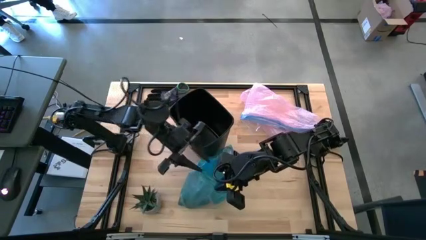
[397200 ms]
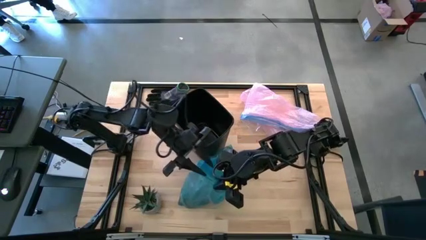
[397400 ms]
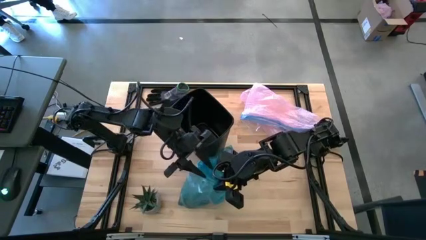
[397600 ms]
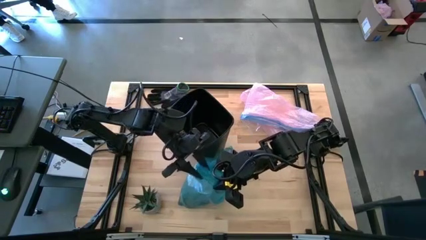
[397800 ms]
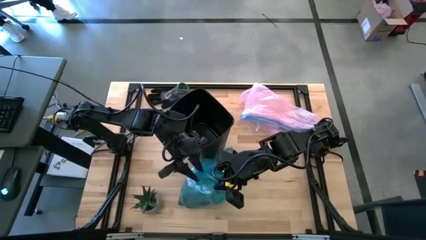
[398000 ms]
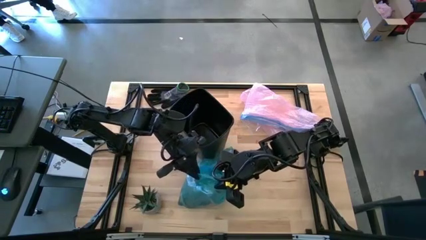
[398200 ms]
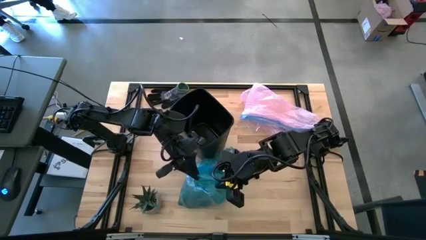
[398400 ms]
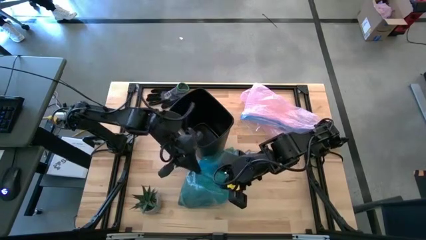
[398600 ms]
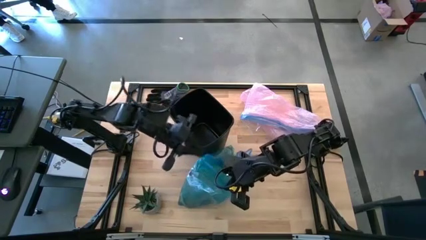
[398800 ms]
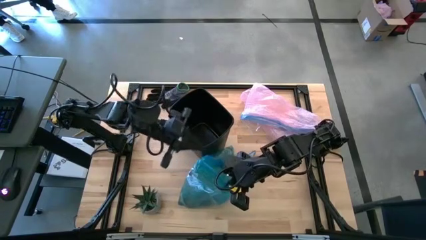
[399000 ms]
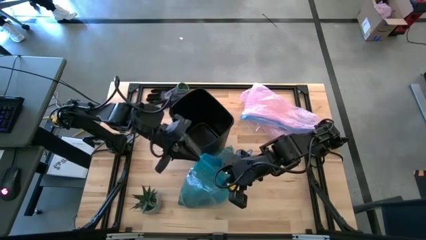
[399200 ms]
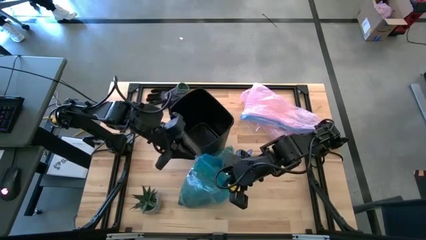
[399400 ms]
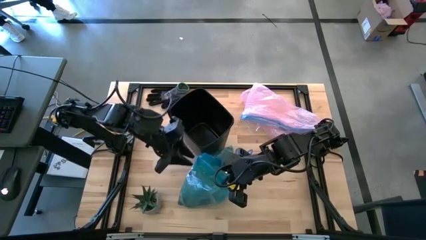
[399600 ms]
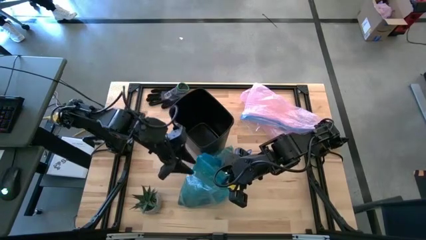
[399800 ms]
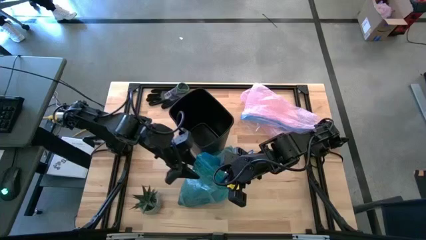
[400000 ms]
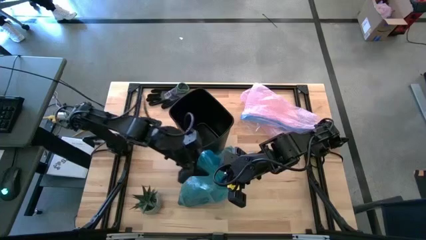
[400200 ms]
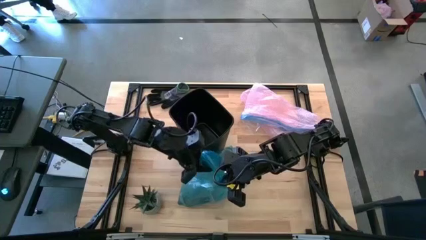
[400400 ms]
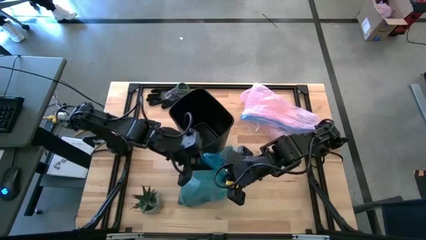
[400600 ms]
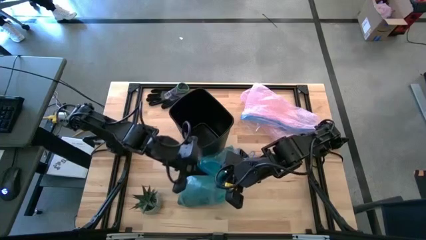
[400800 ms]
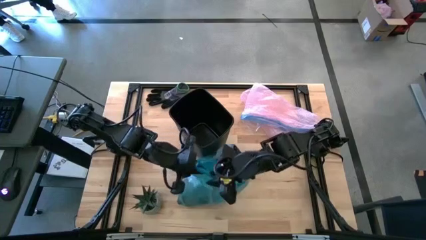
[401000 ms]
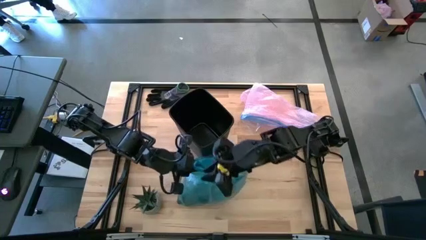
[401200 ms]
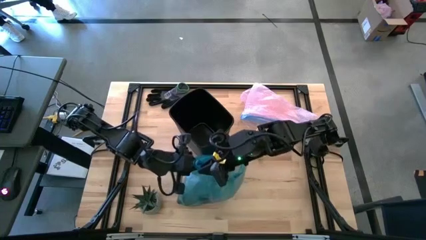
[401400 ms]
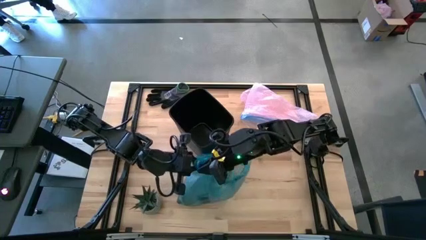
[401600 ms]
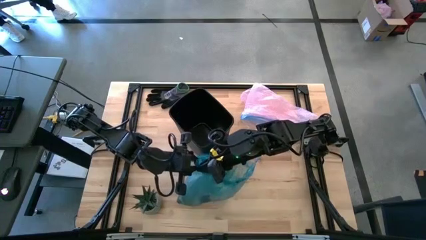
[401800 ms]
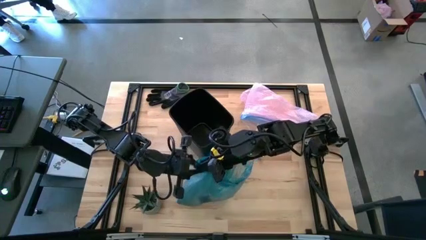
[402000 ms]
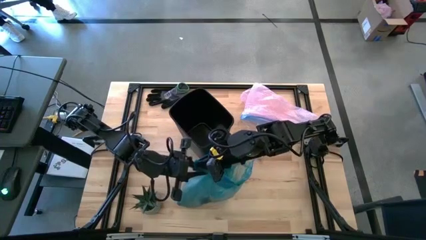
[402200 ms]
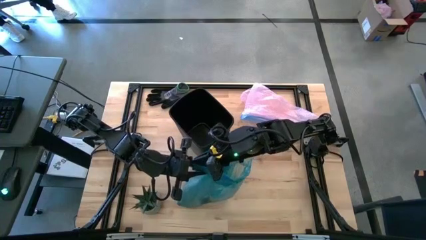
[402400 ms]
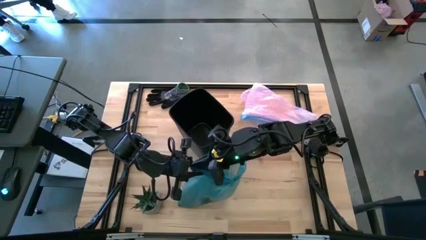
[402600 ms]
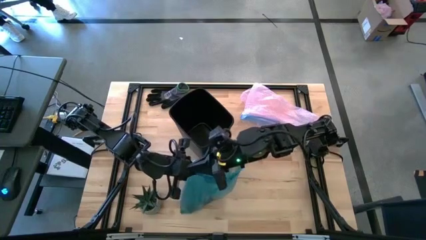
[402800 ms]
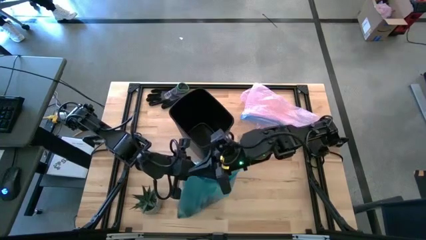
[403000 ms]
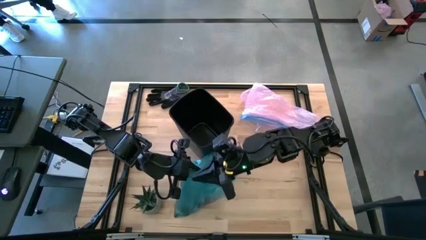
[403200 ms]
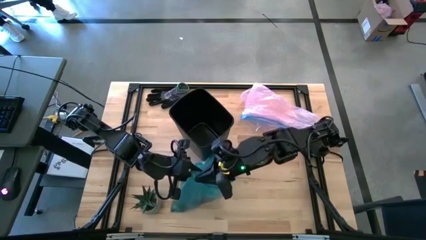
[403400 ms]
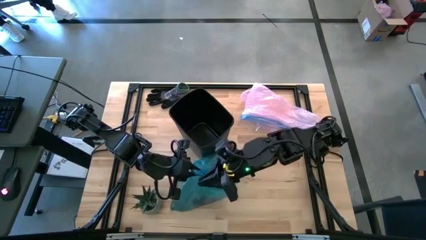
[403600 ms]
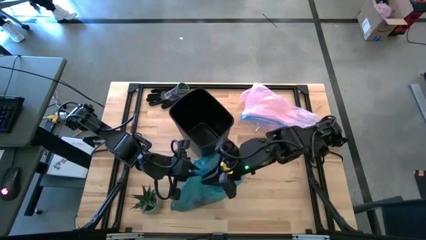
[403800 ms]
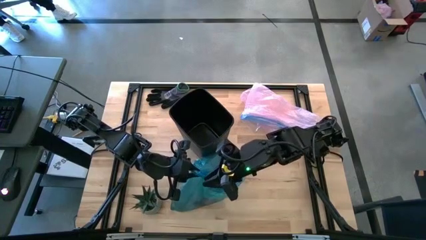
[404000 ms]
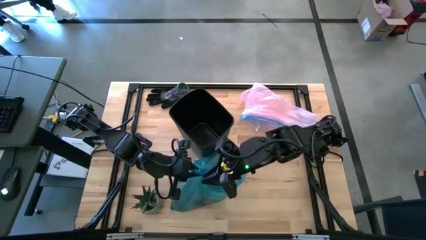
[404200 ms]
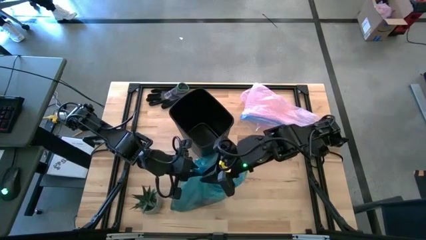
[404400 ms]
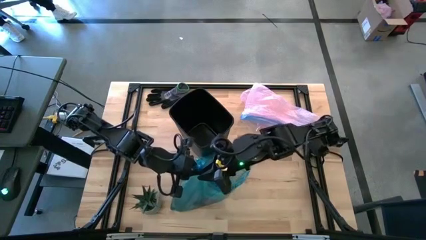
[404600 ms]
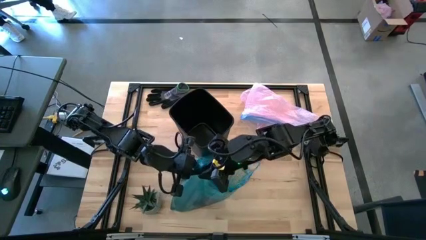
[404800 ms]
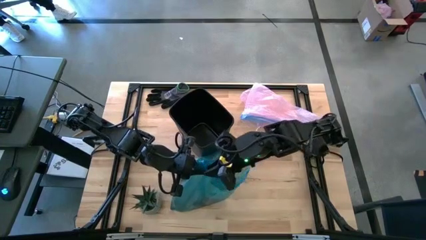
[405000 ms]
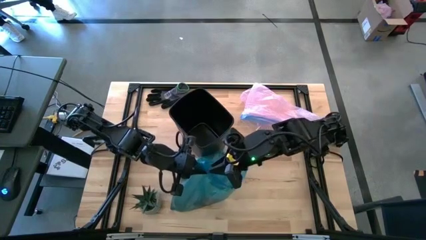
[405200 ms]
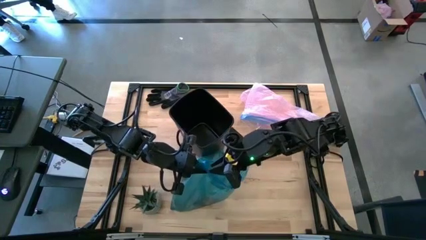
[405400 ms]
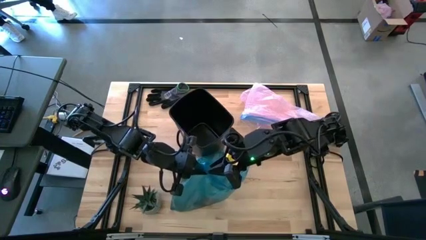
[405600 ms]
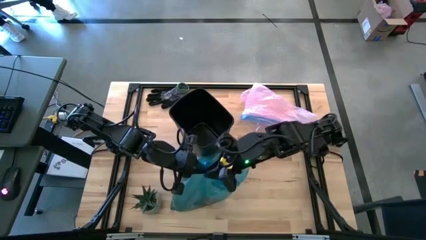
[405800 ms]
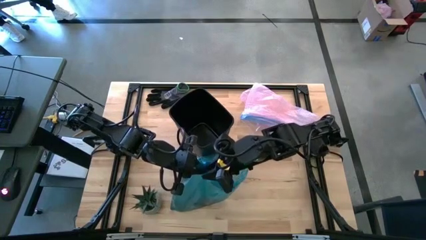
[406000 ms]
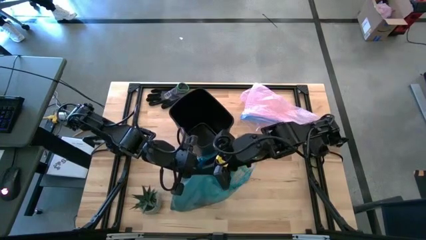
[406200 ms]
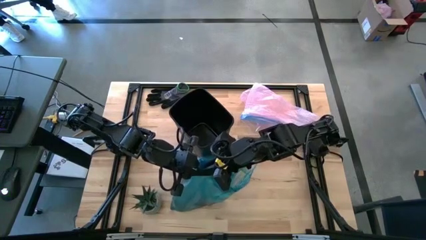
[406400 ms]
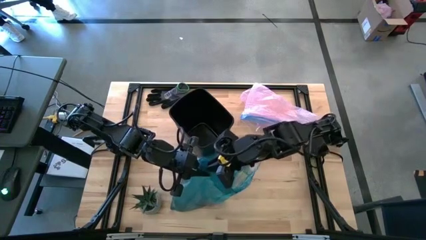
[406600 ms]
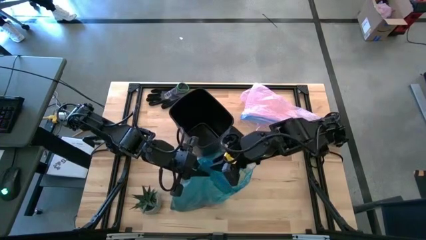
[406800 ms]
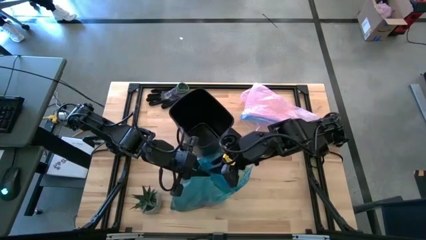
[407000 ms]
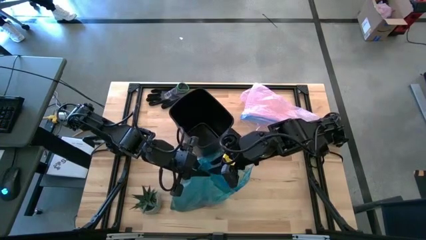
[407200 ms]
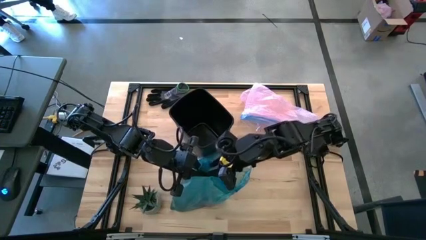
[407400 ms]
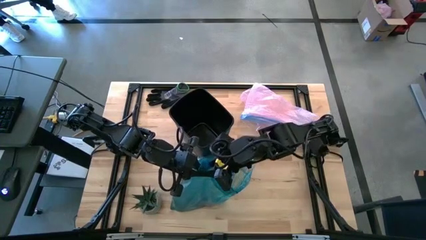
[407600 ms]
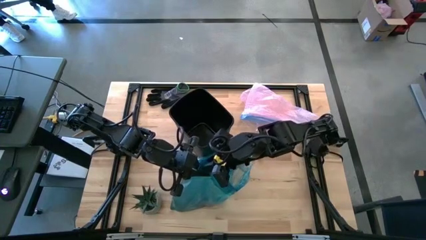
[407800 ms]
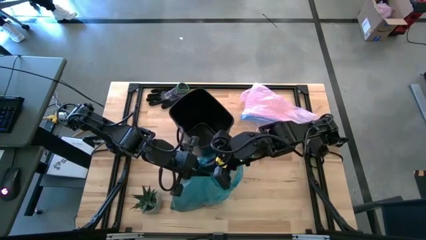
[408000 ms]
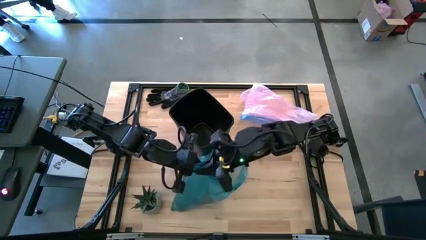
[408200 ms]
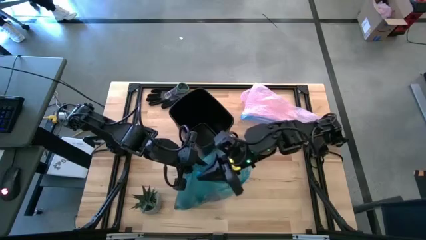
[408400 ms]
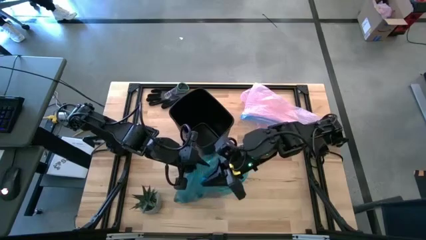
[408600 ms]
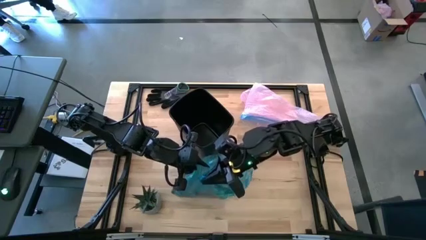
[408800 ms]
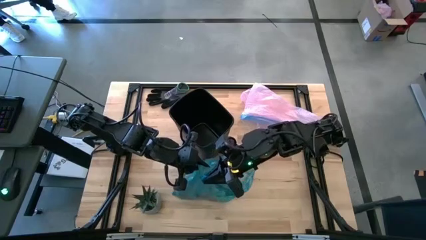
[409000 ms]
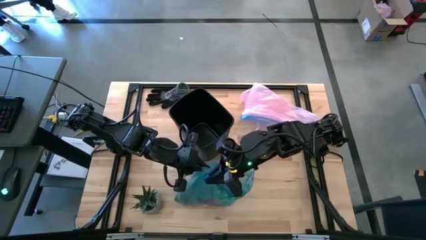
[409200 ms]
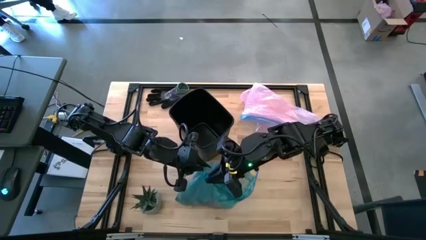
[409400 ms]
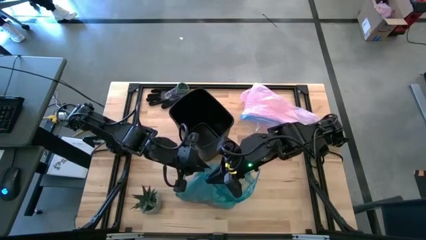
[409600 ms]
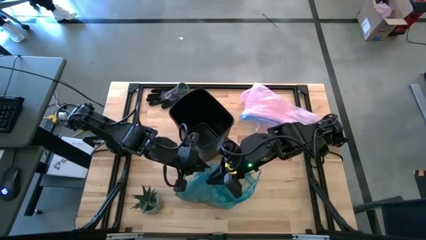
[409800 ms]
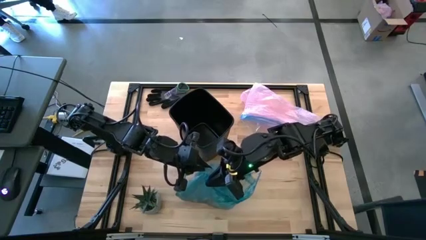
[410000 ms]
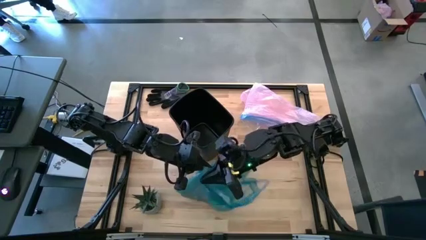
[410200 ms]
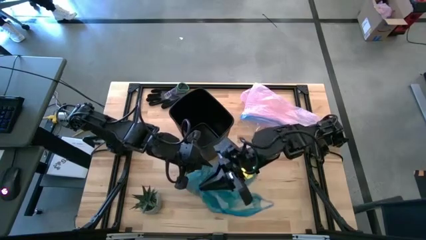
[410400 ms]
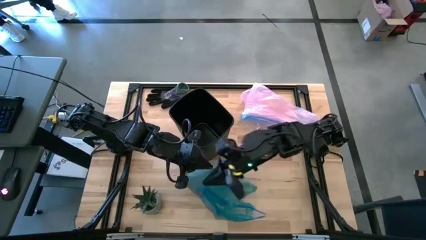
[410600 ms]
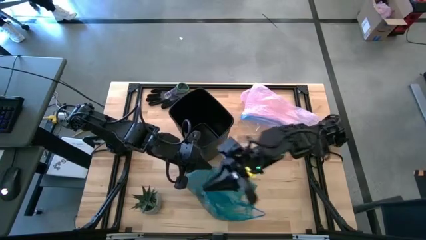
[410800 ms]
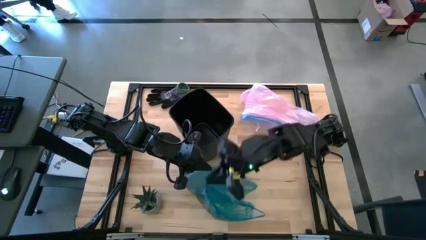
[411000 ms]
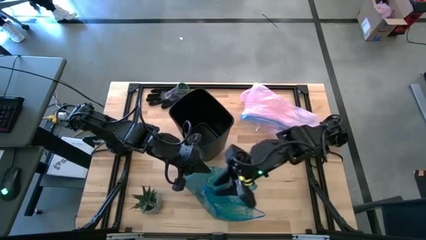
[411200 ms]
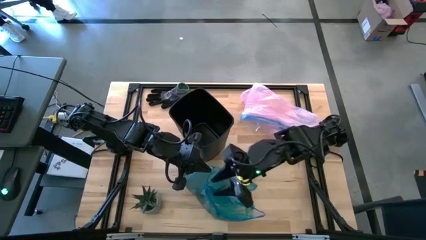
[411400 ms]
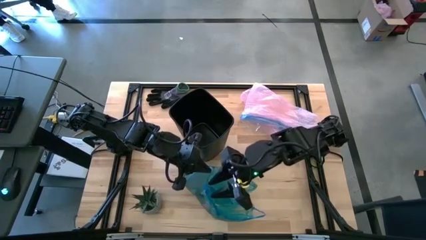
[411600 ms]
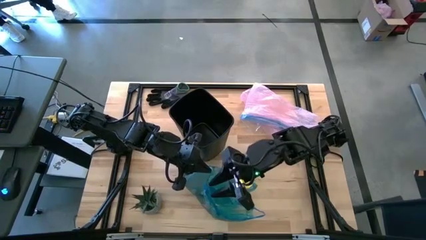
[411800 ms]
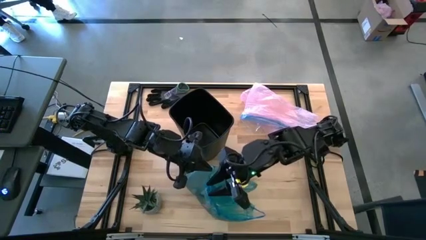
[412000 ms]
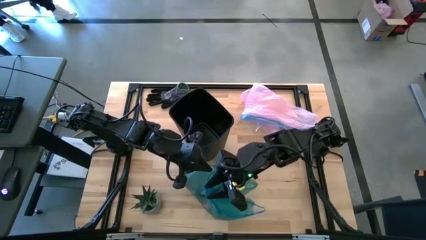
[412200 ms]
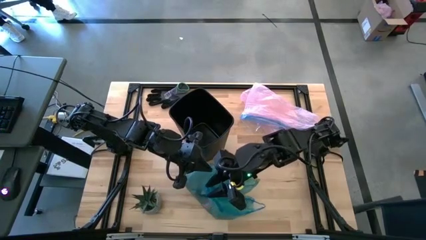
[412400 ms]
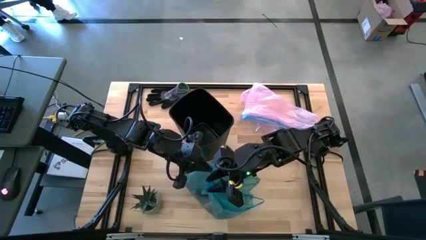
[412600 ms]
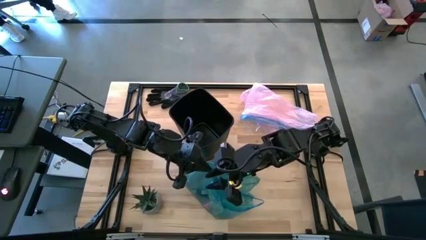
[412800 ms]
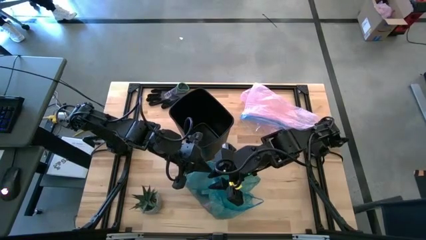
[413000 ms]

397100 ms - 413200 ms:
Task: place trash/remove bag and relplace
Close the blue trash bag
